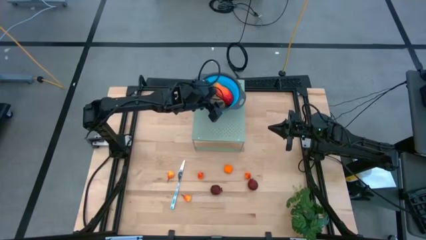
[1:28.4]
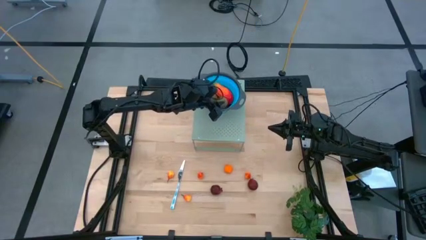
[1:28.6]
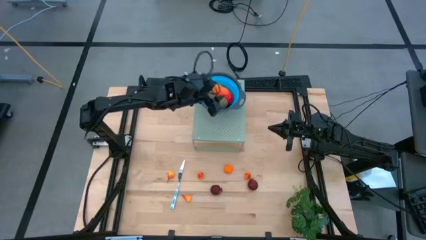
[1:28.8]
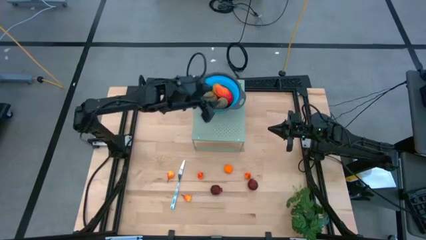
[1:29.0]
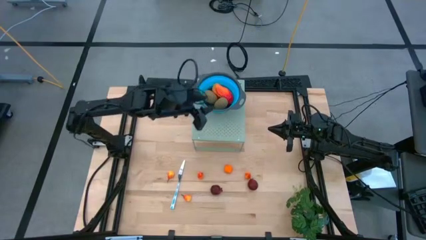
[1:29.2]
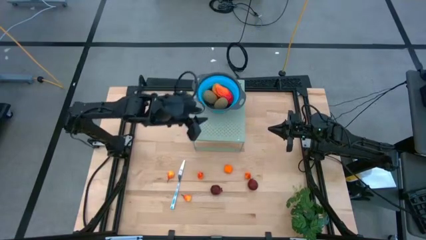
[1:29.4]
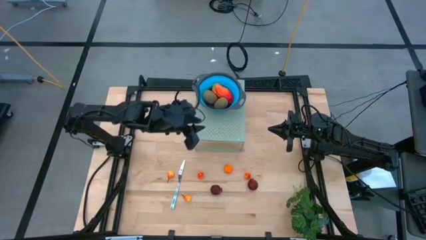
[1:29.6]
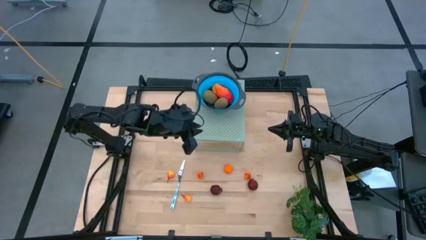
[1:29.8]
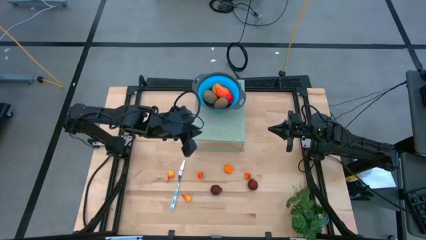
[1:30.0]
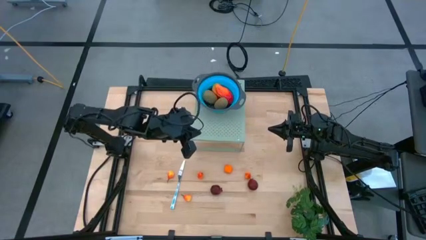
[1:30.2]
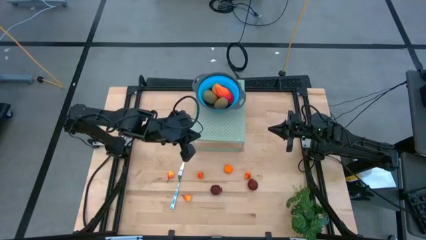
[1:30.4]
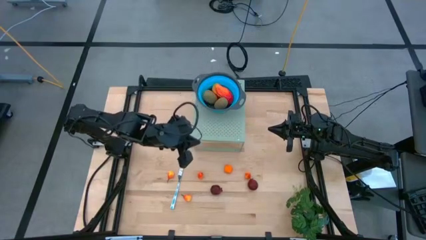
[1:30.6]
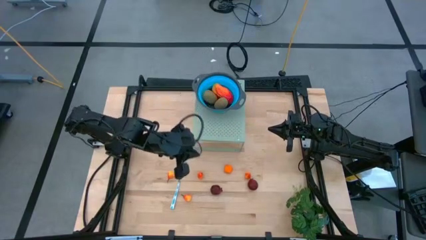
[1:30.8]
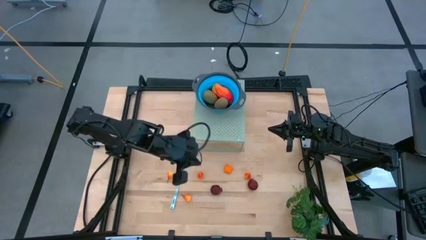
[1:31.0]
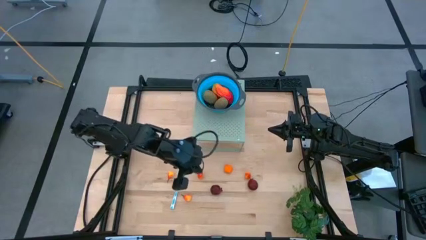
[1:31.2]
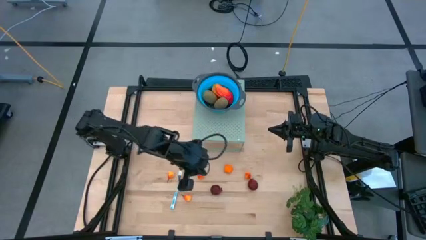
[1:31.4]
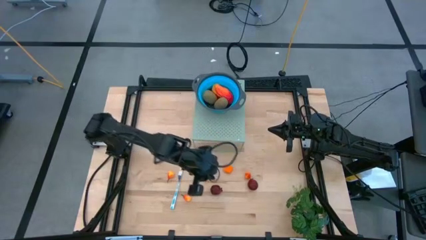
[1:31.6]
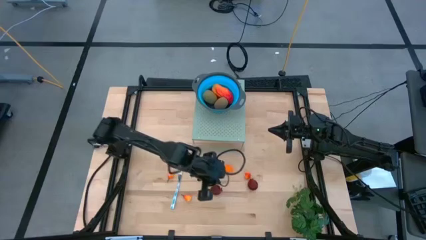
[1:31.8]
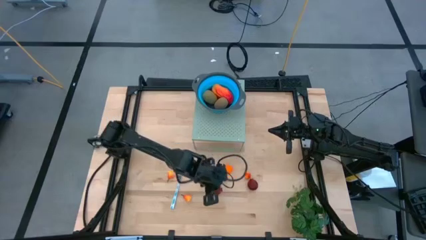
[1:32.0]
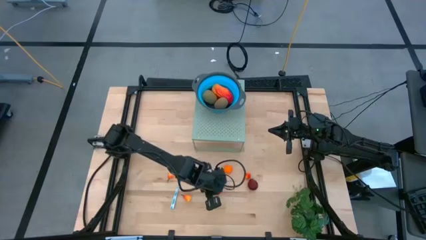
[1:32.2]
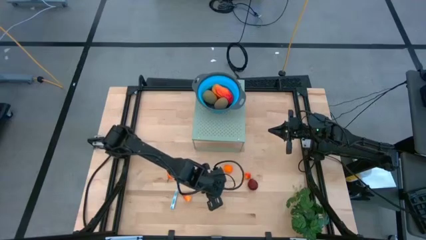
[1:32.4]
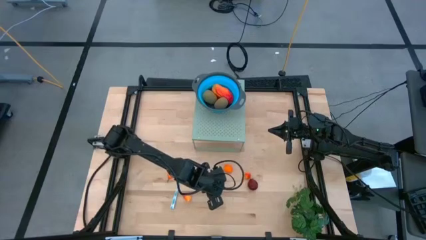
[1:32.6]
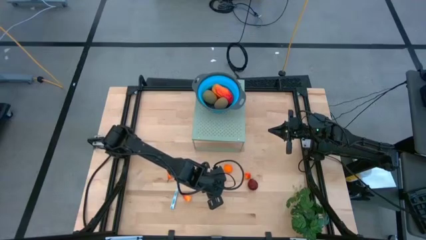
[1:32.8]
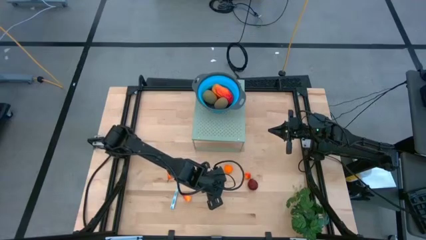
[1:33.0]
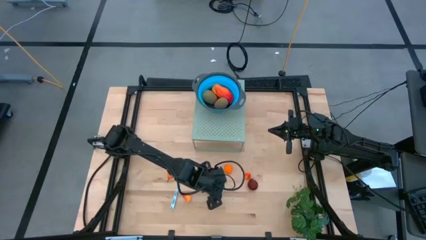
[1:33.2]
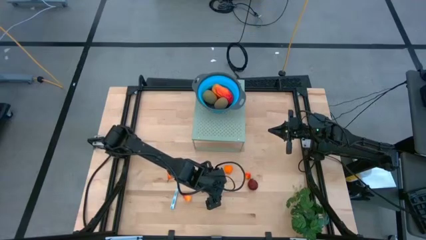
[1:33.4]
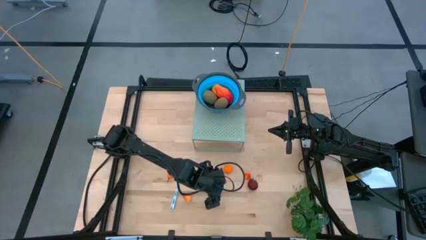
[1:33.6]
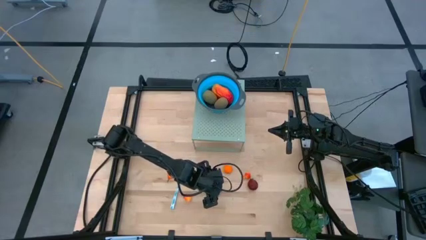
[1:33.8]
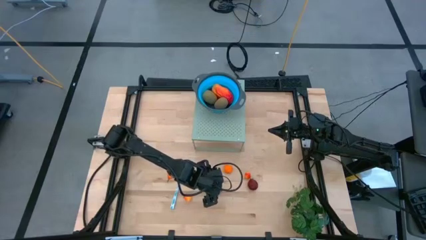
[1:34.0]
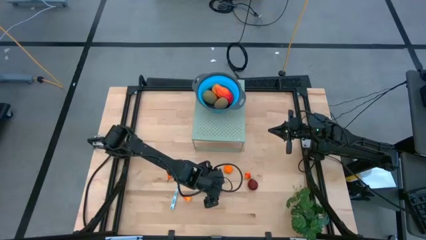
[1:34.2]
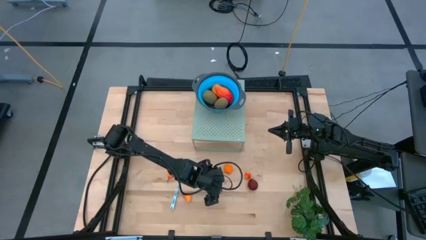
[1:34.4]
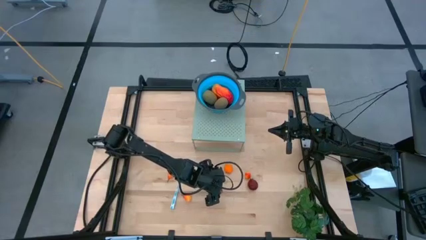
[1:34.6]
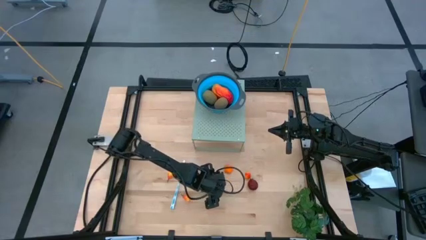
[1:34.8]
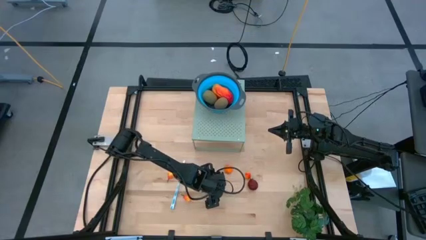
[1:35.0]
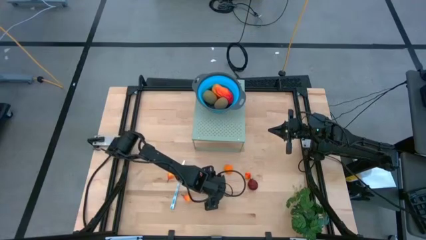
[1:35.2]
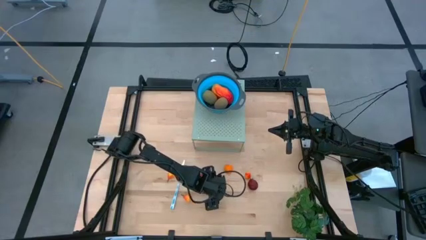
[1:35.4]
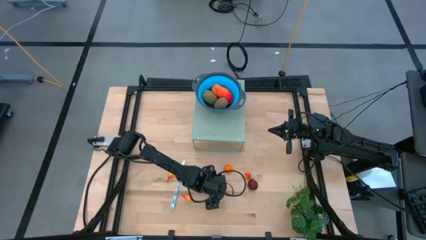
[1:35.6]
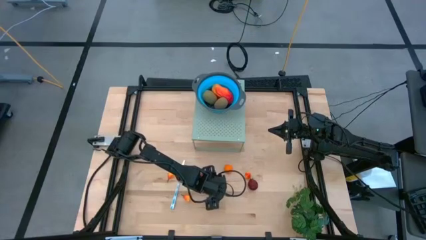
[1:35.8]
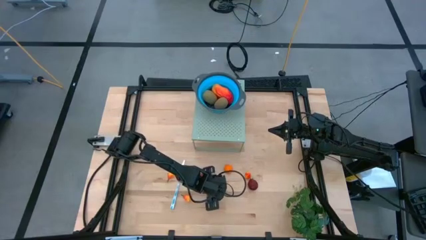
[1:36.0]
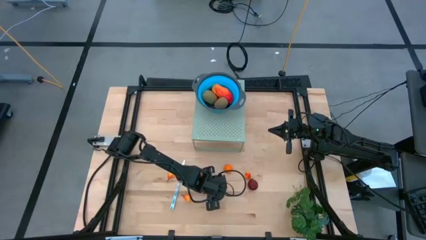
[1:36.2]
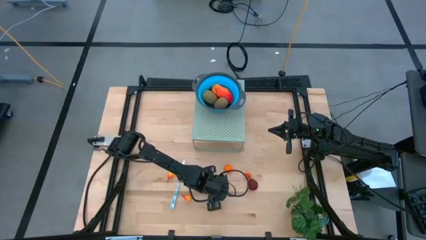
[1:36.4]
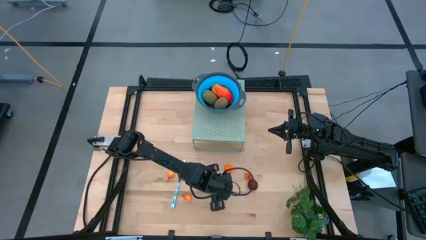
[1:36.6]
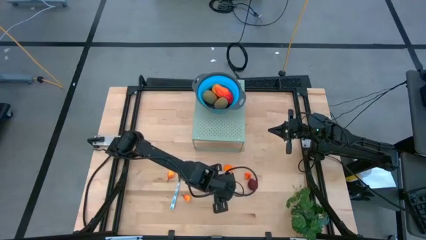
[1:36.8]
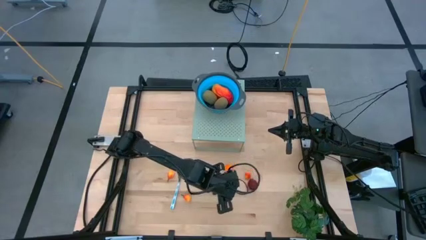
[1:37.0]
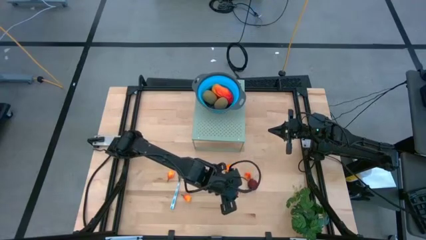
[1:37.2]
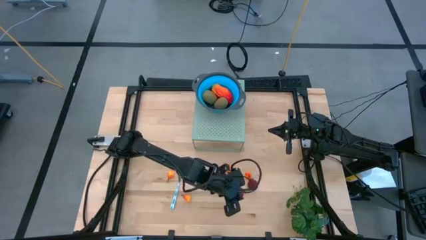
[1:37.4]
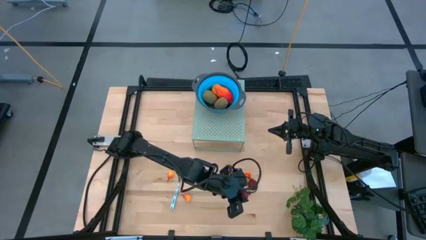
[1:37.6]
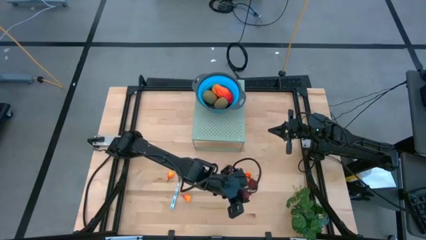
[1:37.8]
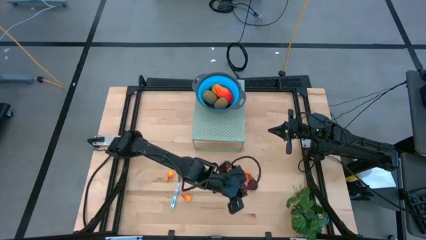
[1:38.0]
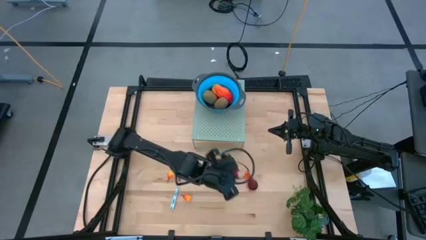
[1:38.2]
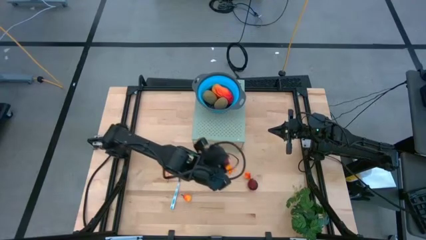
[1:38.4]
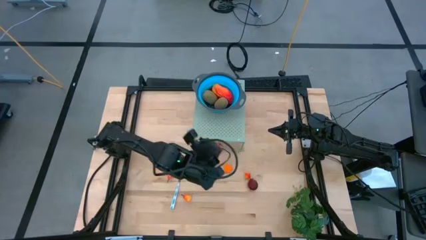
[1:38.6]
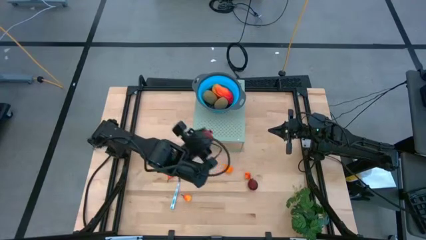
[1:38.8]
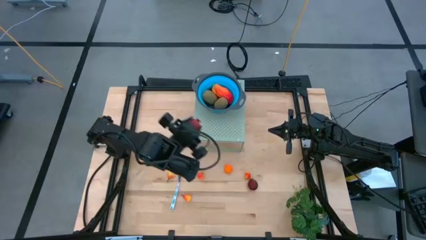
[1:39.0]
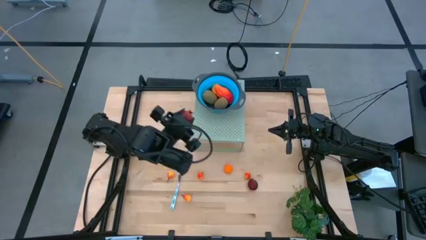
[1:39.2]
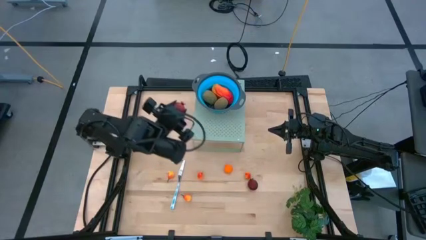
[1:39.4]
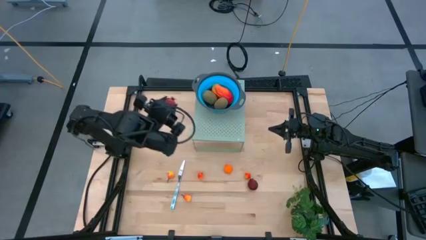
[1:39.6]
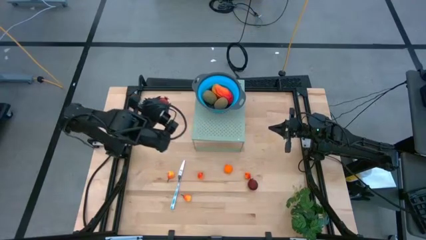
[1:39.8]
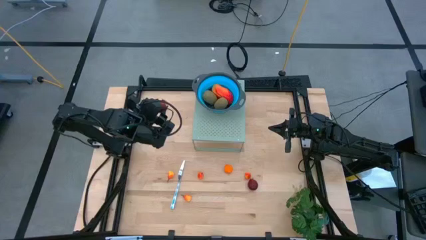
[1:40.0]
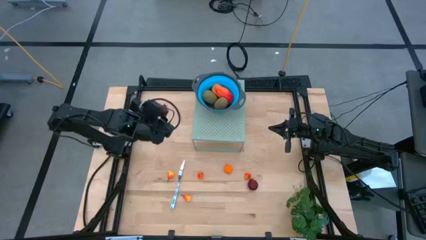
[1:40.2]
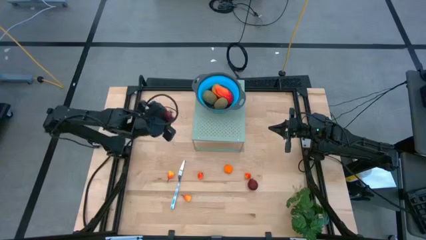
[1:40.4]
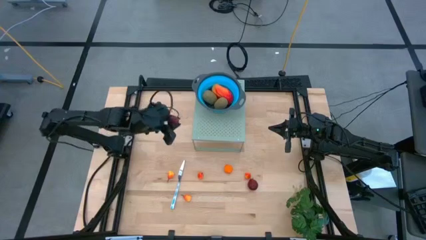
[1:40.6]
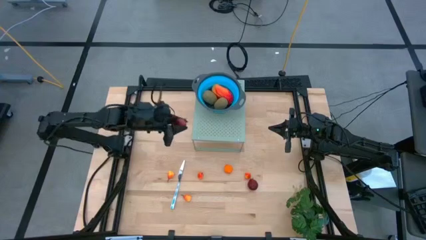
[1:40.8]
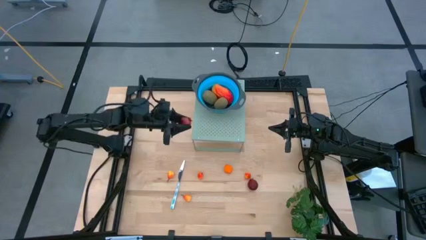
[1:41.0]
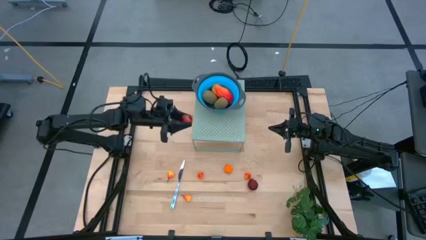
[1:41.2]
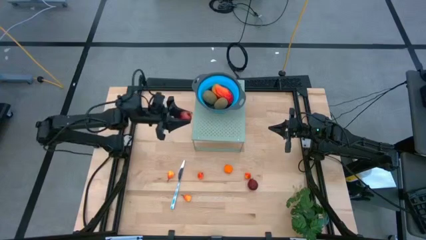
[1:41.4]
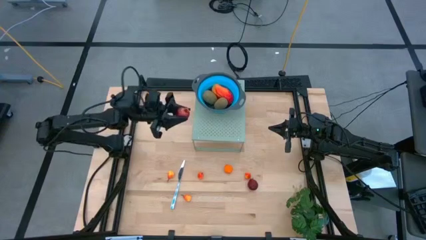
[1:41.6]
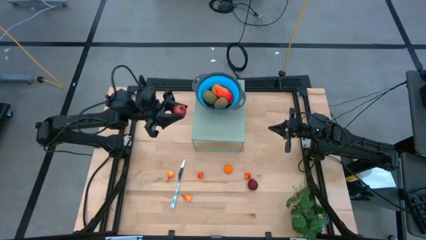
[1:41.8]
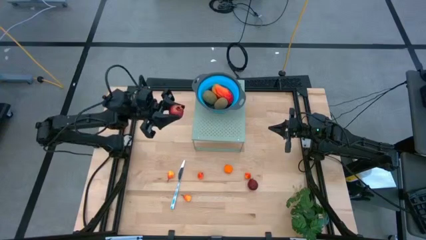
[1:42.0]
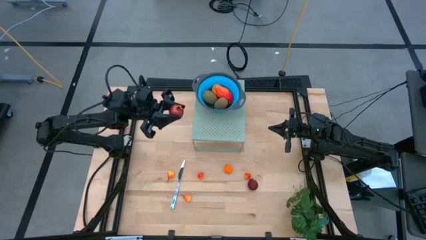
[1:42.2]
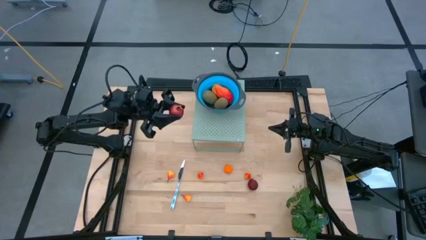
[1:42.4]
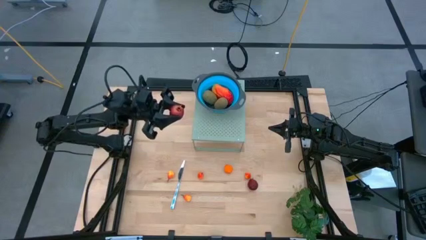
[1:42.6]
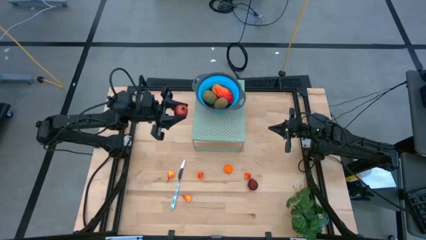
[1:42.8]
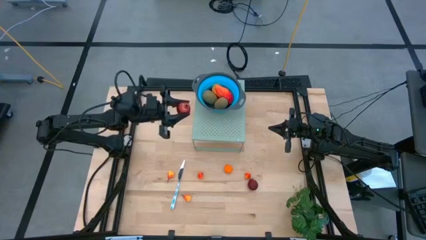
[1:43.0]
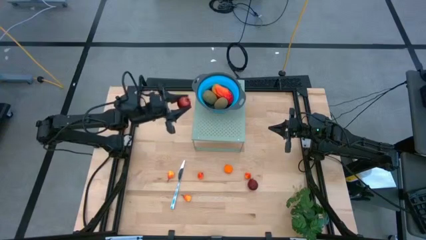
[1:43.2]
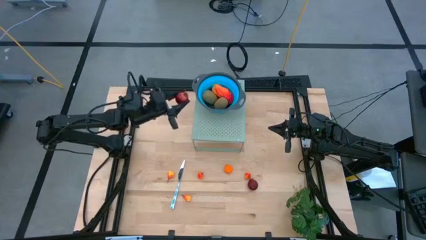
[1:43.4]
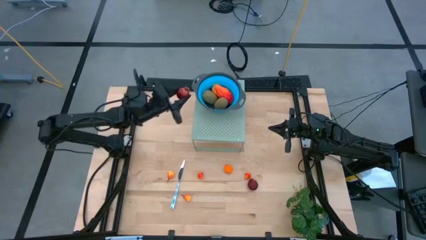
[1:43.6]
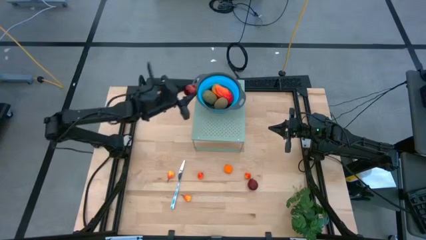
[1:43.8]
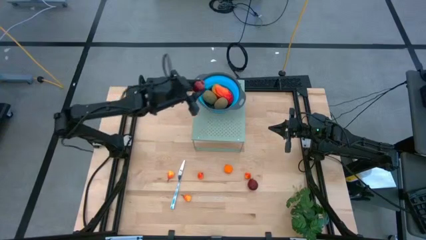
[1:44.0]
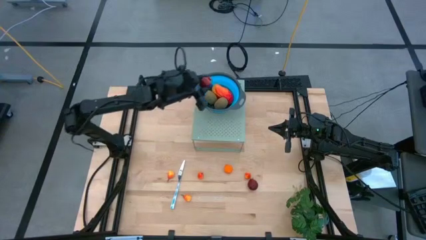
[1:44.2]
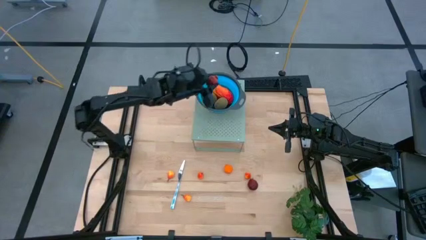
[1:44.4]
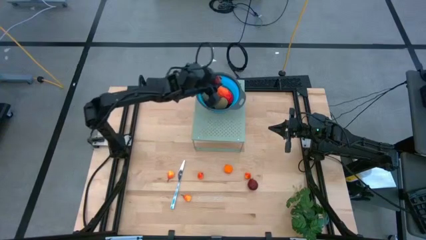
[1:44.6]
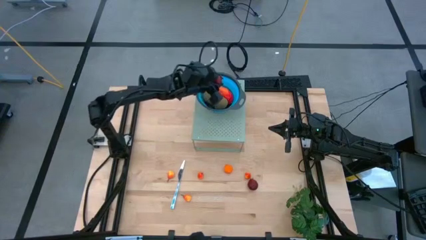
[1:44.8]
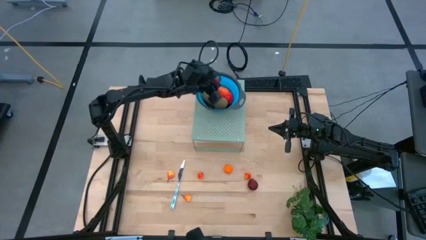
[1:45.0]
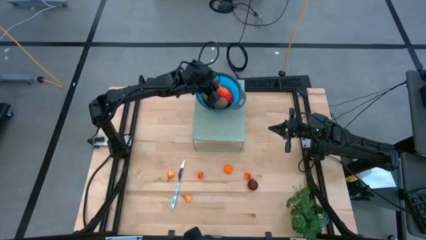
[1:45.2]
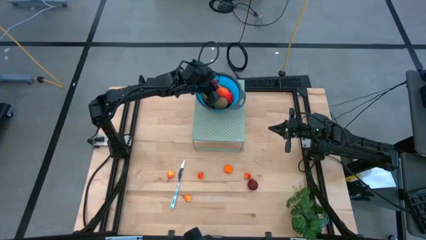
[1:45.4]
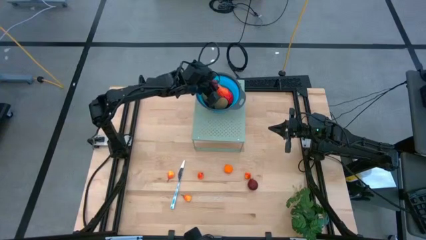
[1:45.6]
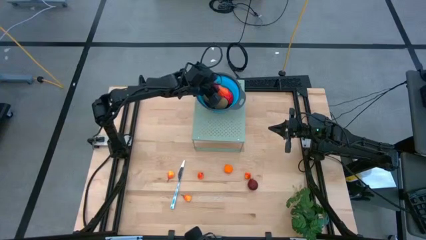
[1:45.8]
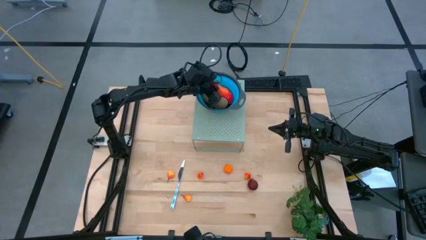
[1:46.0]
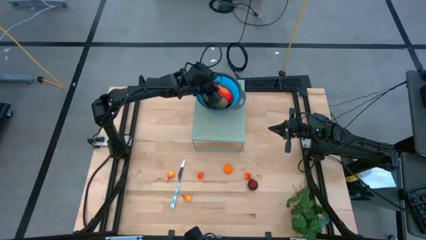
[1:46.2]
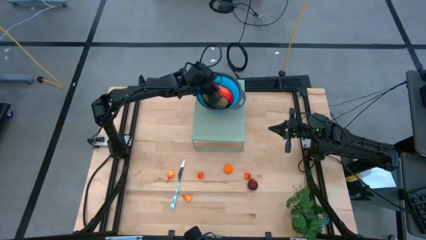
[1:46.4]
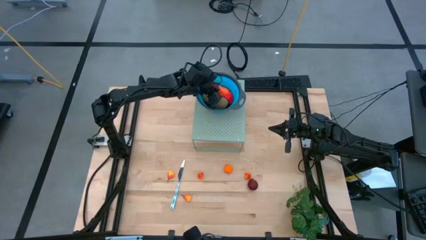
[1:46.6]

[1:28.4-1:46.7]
Task: Pick & Place Fruit
Put the left pomegranate into the blue strainer bowl on the shelf
